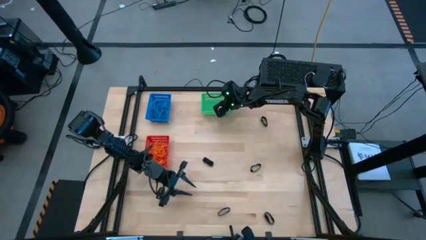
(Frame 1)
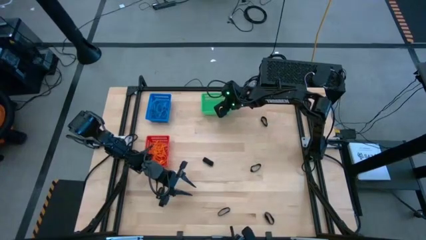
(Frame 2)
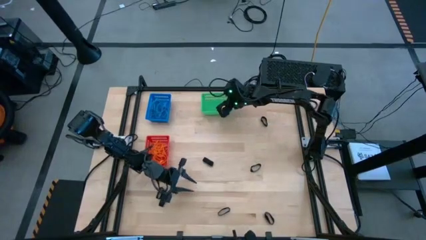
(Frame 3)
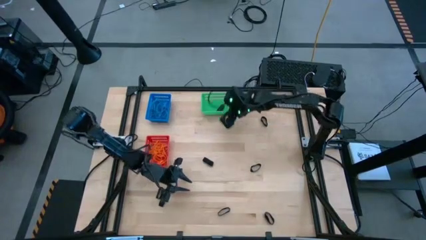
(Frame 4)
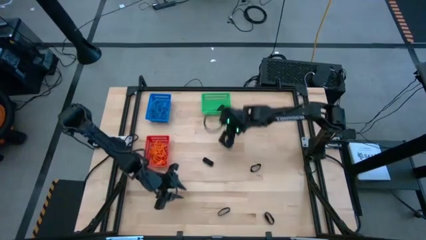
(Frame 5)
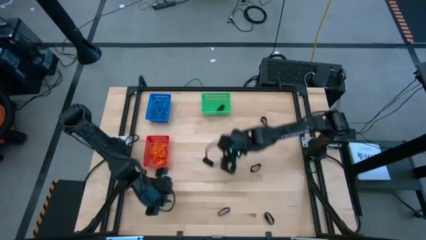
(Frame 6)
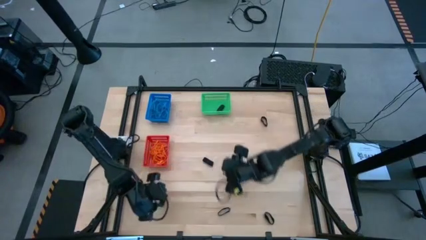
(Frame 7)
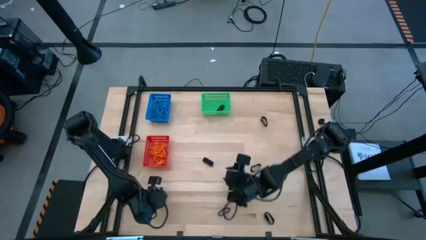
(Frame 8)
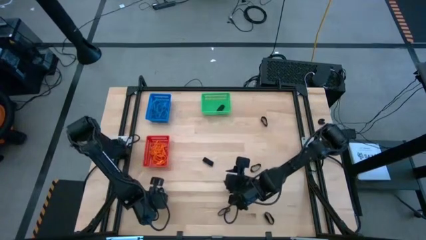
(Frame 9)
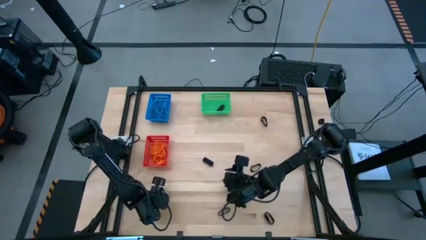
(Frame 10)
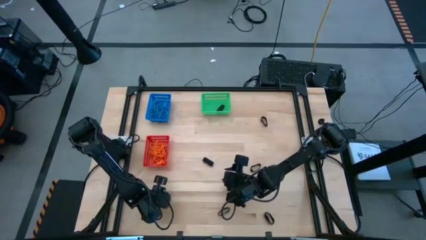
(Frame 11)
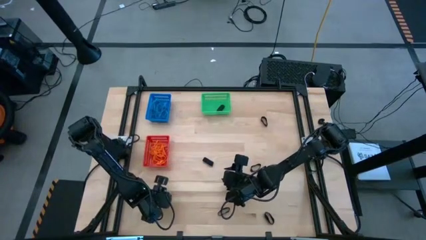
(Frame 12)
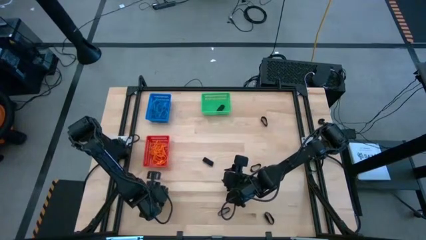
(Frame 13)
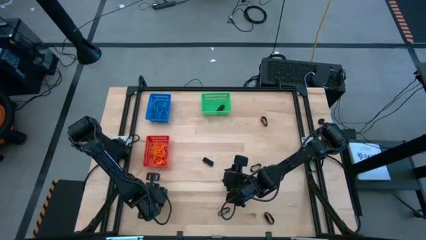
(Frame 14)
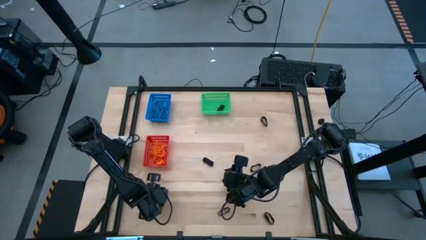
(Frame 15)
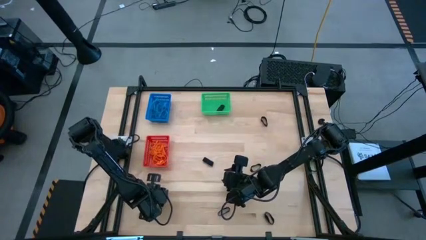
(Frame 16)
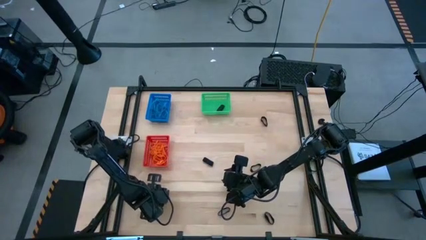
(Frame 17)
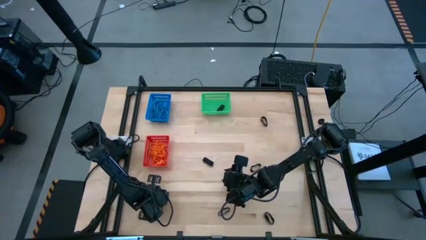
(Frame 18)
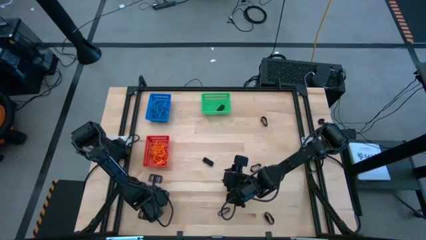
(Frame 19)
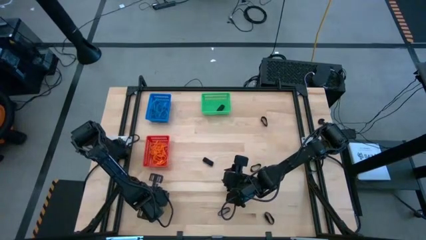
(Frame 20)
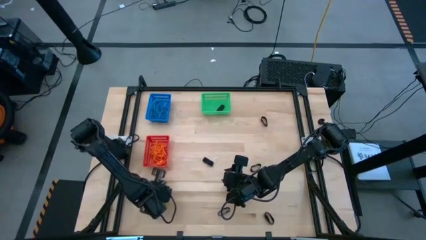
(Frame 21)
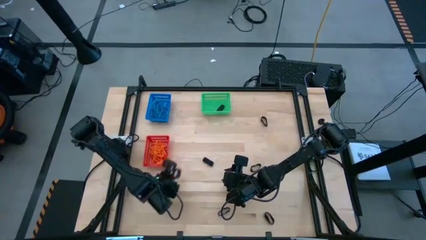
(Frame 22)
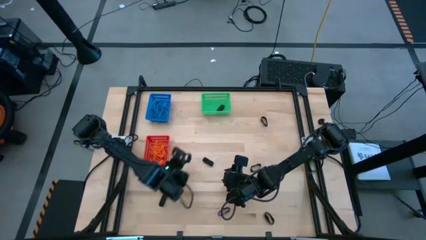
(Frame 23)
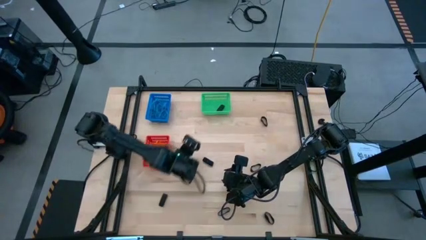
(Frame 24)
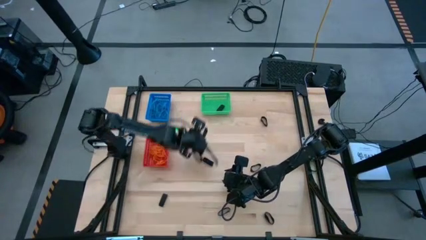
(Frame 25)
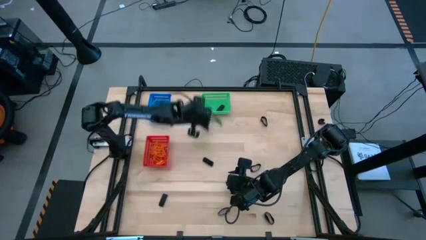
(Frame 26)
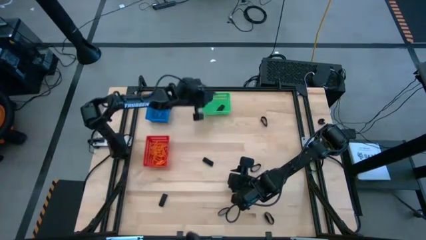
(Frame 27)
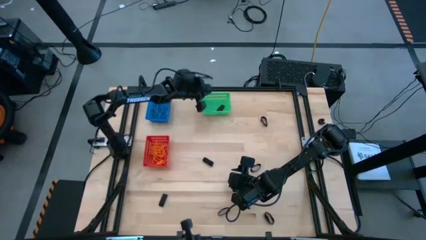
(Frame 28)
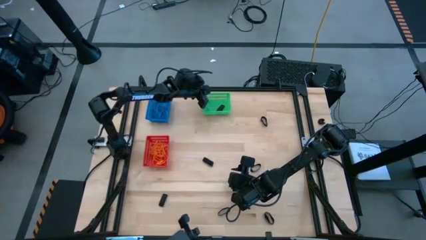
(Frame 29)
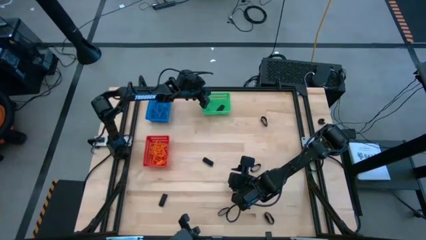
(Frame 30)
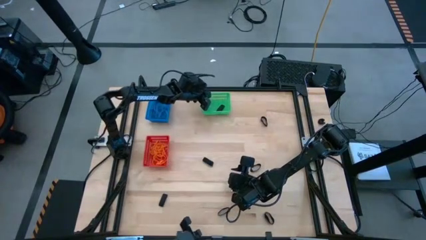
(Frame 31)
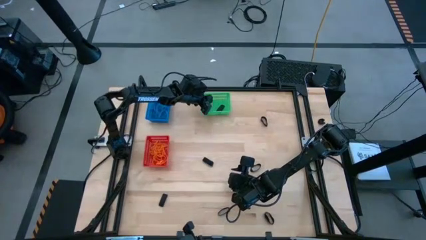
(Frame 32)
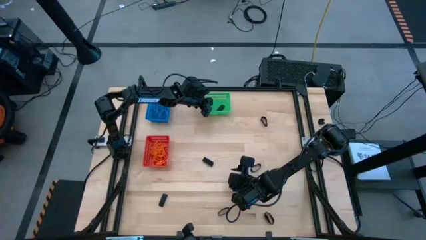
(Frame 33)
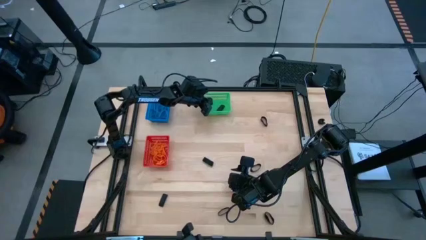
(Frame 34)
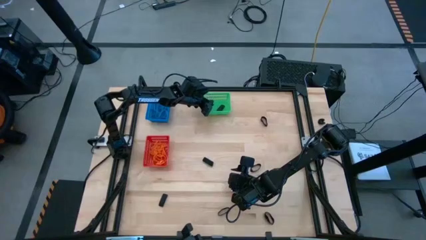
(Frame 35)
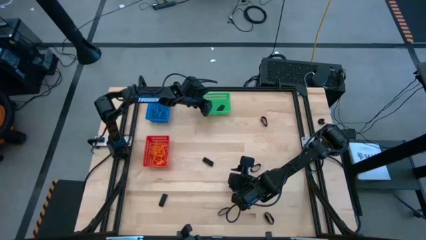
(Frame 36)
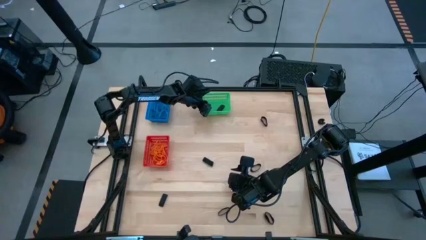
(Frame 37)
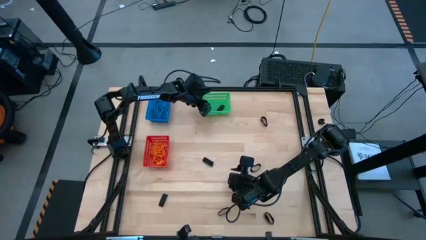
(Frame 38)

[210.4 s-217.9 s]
Task: Sort rubber bands into baskets
Put the black rubber band into the green bin

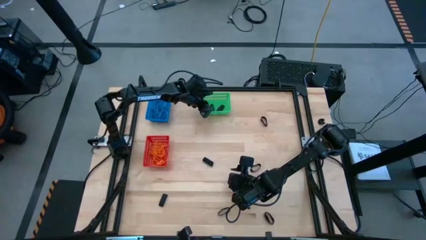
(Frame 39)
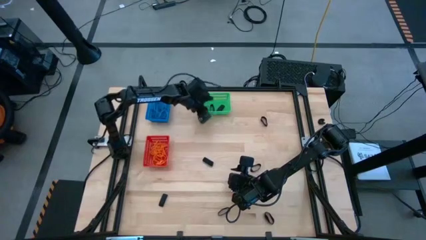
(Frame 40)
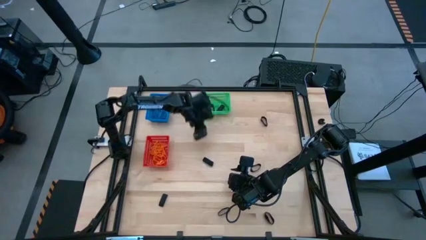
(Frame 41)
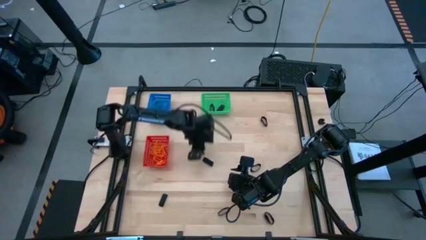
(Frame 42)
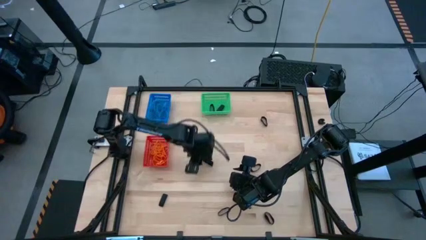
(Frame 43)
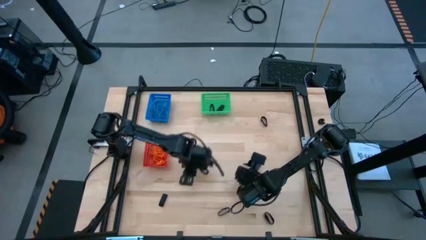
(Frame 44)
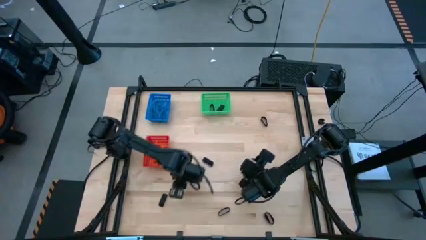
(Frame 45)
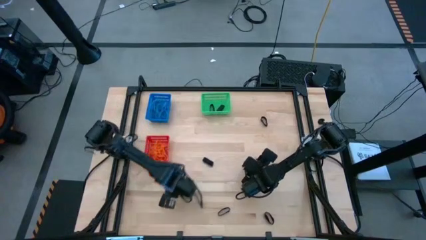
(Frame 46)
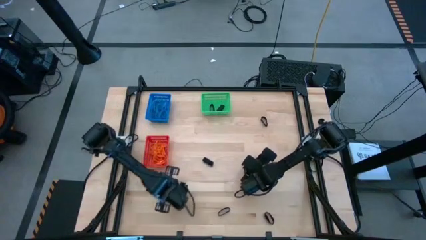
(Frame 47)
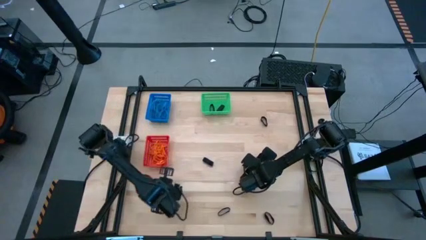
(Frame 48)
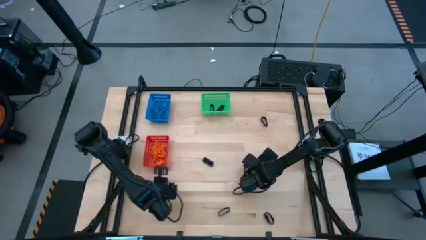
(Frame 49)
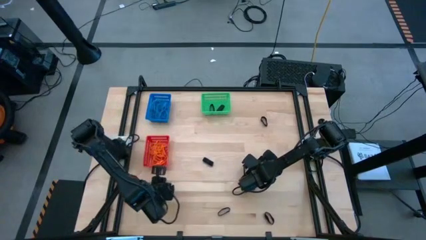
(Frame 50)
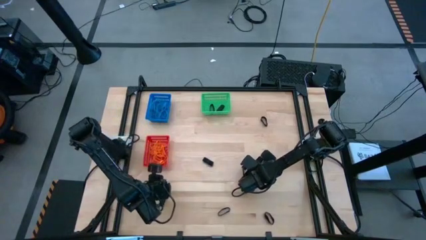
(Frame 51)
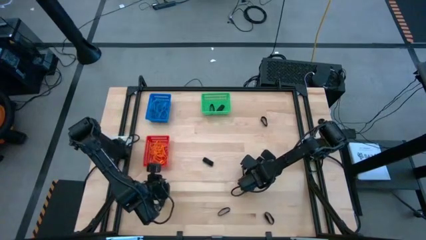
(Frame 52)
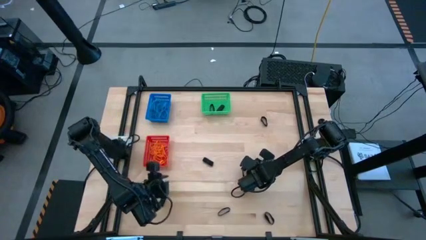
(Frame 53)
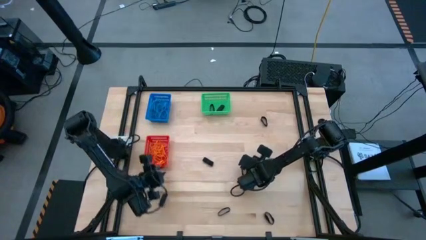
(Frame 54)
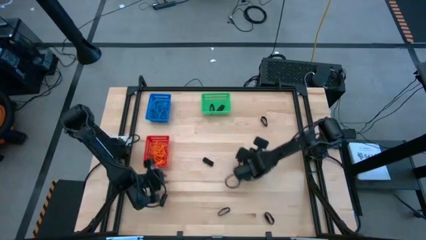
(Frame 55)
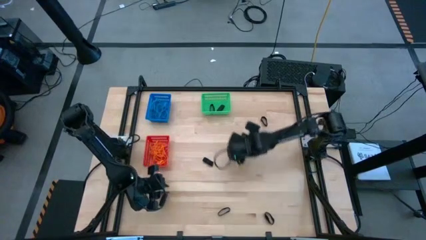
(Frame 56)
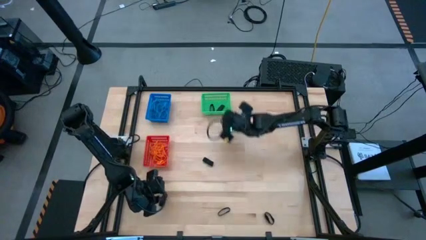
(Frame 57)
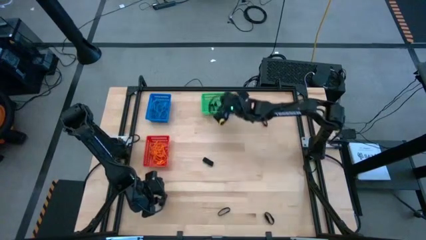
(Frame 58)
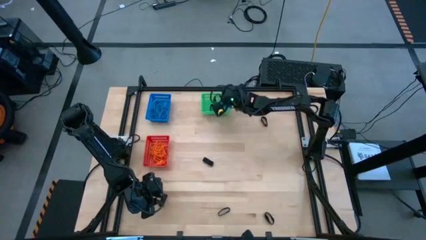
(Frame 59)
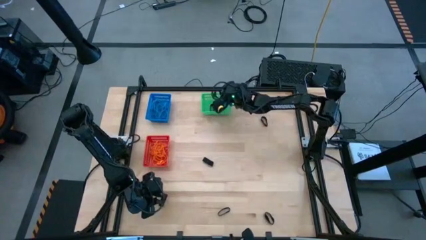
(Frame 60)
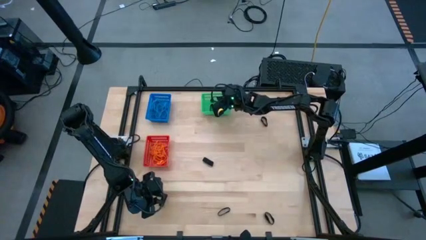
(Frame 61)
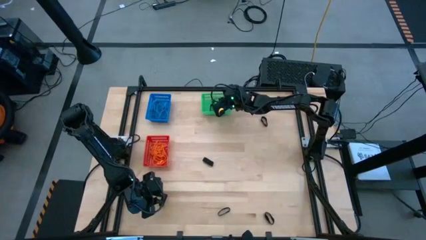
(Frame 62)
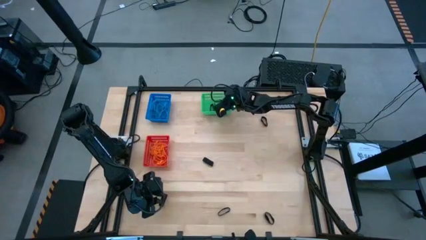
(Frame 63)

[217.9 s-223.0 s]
Put the black rubber band into the green bin

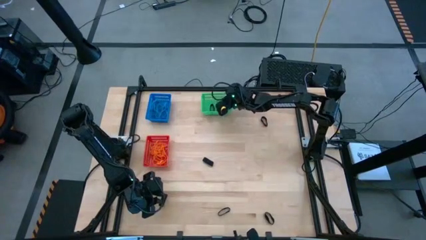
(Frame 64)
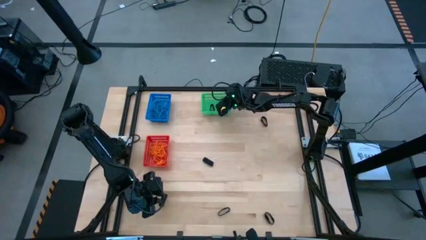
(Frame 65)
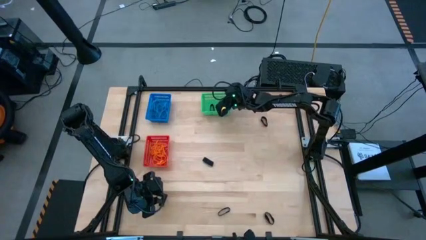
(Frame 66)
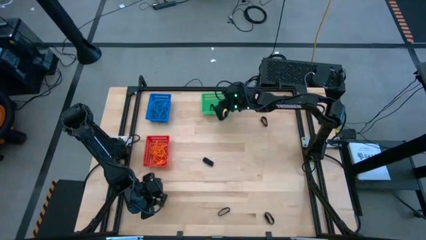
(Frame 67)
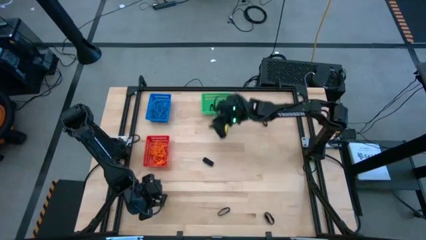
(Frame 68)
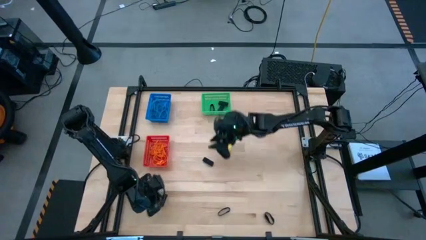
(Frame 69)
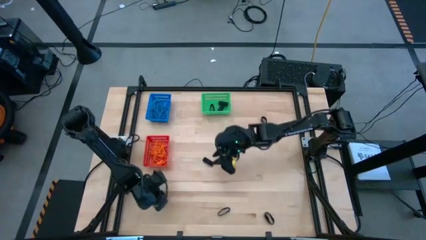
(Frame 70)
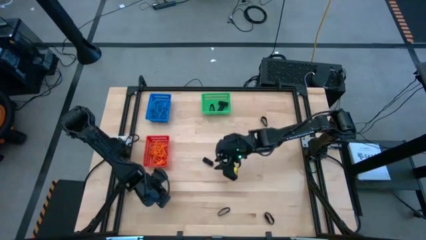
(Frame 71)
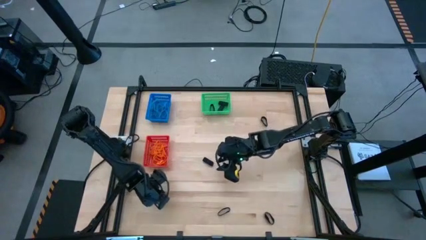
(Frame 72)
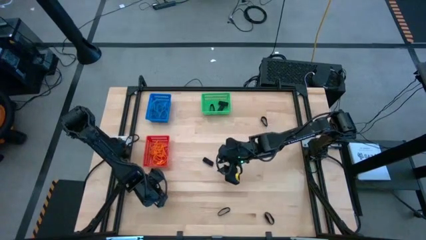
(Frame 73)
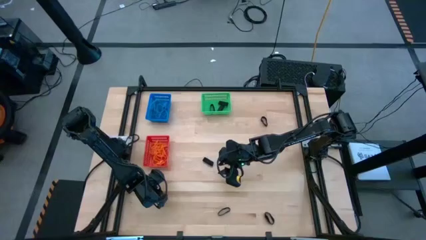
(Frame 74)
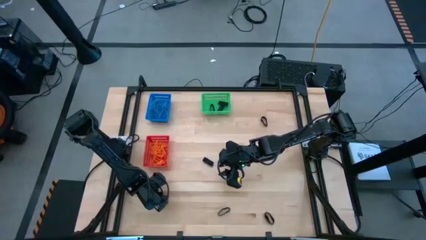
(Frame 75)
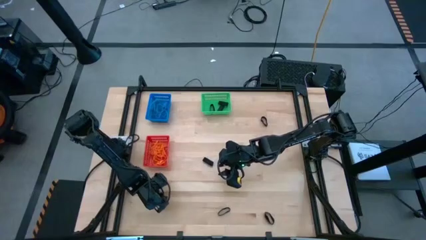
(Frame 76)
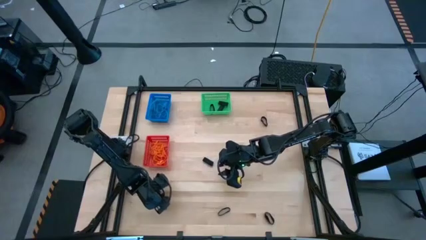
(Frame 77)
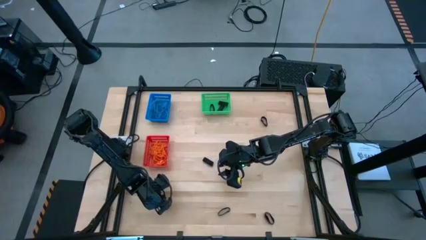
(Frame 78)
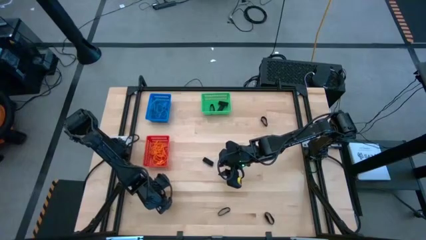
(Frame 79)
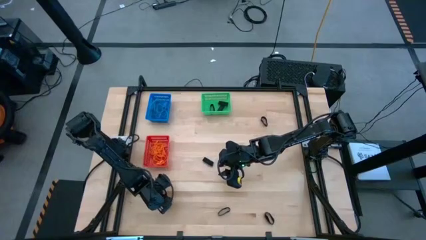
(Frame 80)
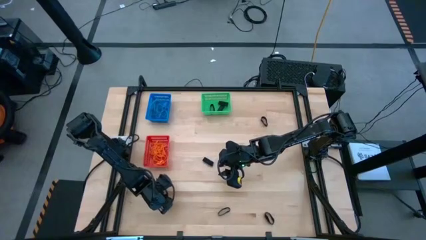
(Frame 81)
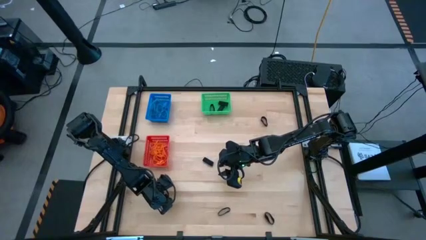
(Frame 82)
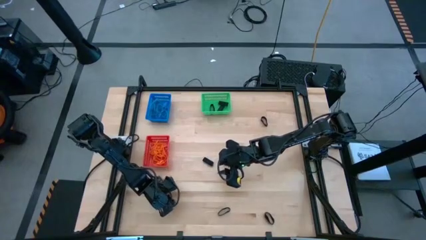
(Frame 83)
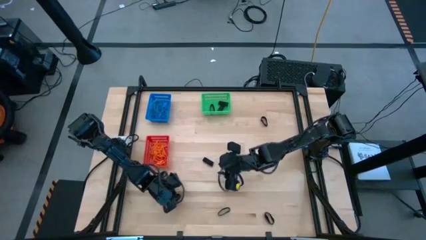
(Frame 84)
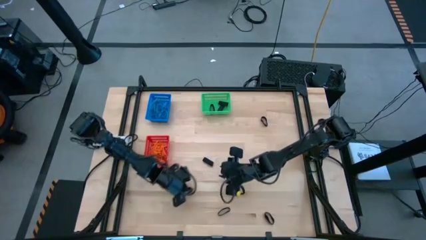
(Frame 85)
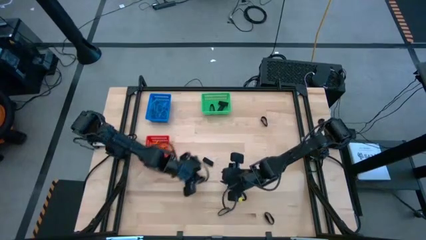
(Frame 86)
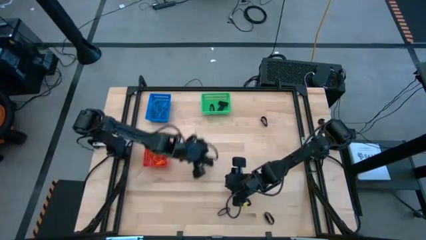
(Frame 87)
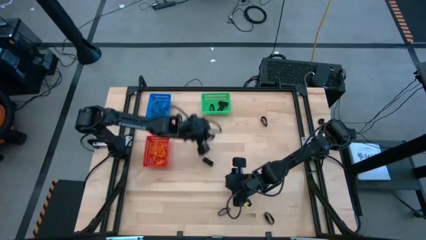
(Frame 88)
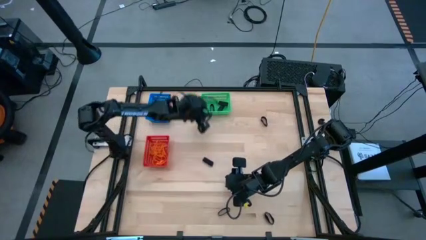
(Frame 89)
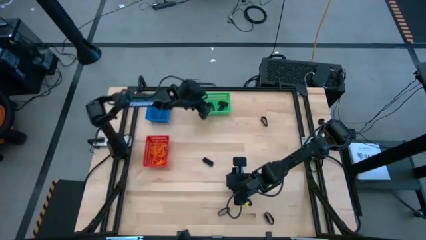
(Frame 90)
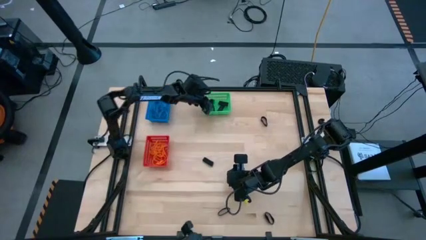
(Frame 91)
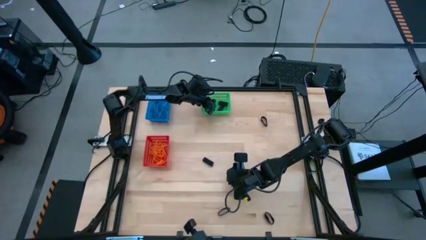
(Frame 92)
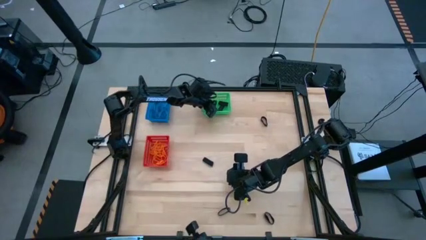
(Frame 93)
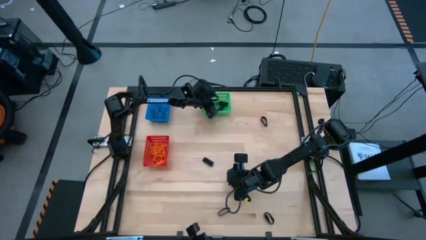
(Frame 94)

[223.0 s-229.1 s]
Put the black rubber band into the green bin
